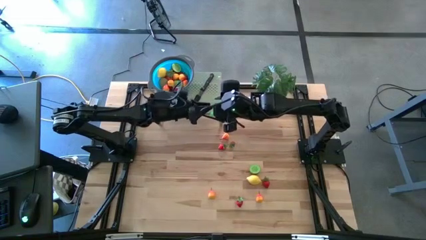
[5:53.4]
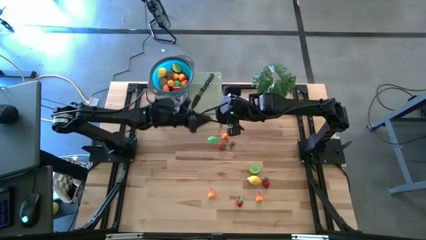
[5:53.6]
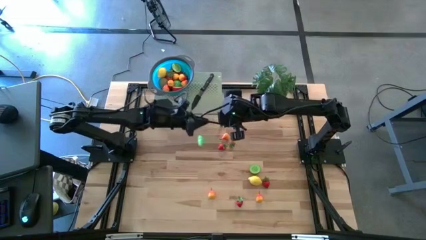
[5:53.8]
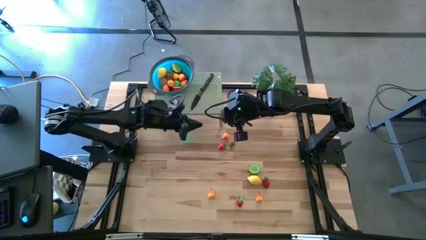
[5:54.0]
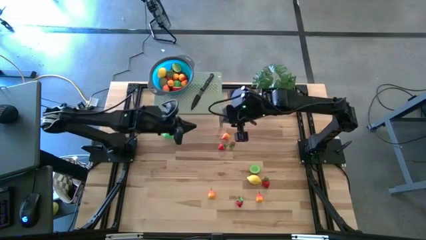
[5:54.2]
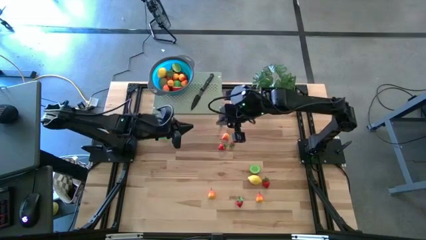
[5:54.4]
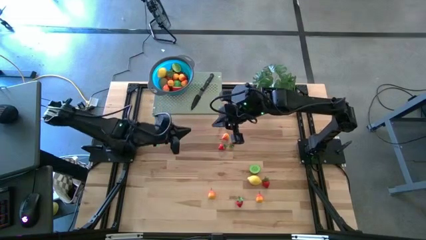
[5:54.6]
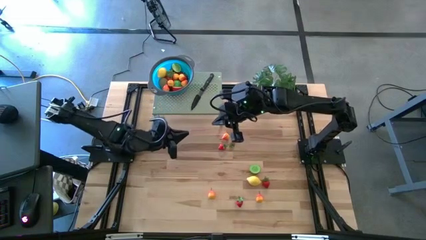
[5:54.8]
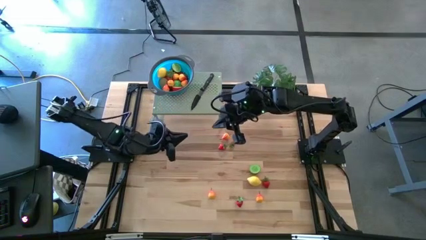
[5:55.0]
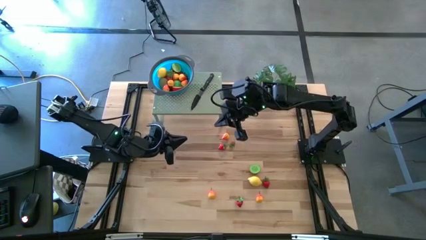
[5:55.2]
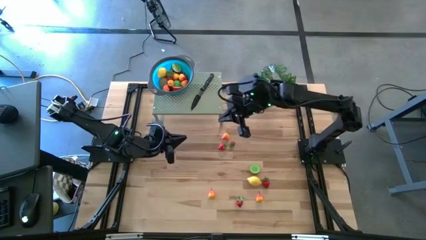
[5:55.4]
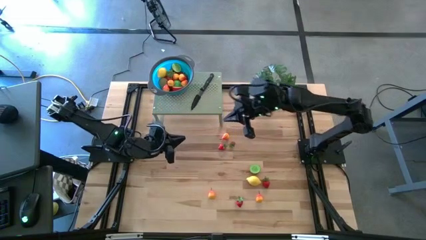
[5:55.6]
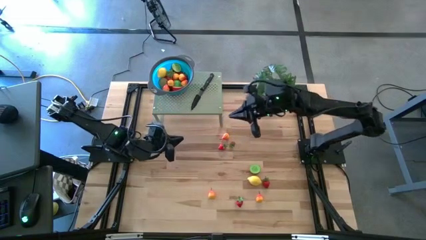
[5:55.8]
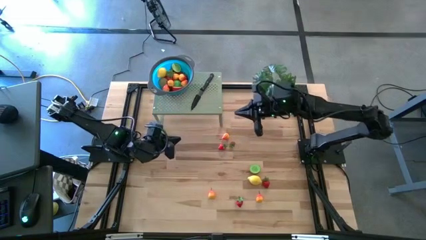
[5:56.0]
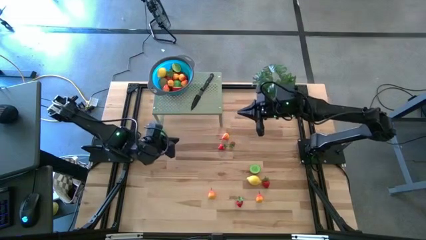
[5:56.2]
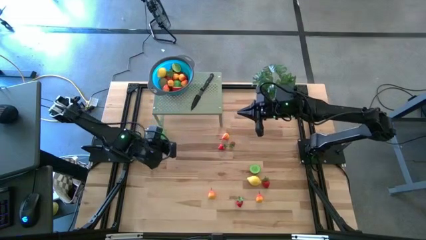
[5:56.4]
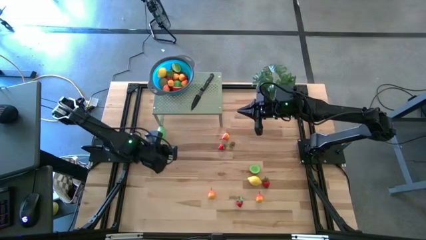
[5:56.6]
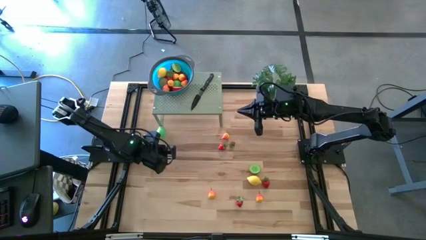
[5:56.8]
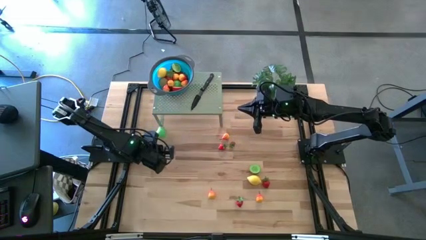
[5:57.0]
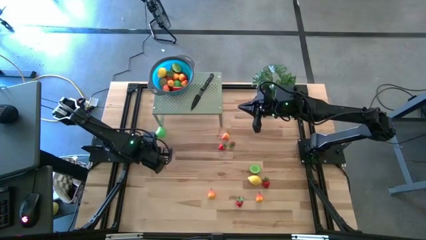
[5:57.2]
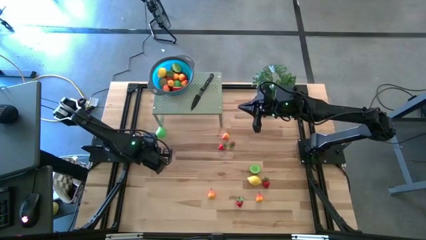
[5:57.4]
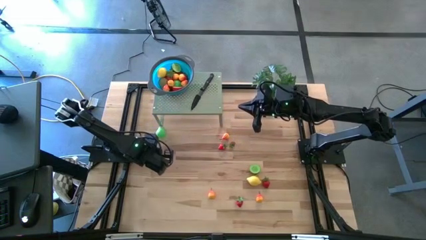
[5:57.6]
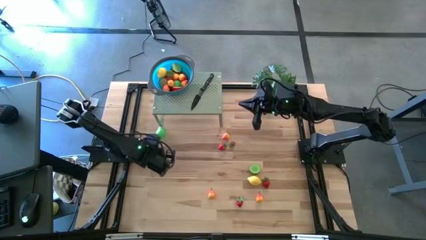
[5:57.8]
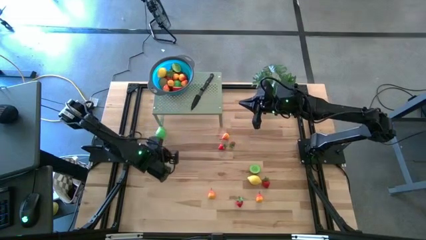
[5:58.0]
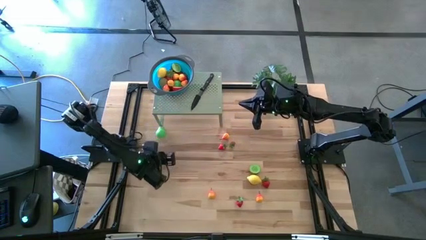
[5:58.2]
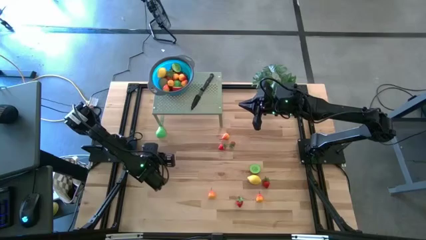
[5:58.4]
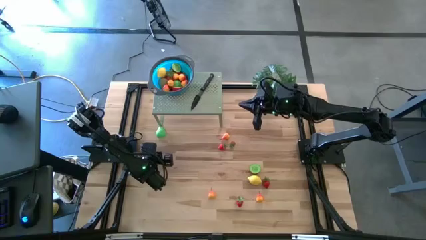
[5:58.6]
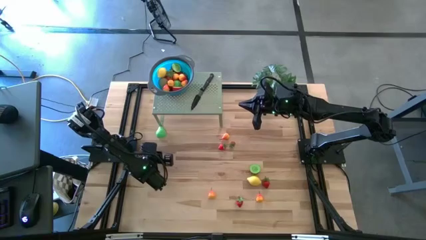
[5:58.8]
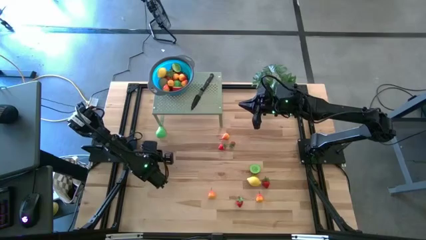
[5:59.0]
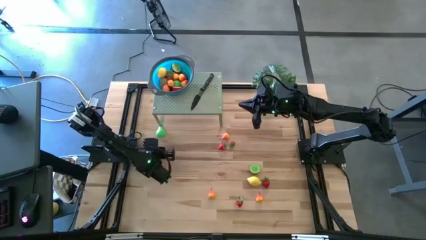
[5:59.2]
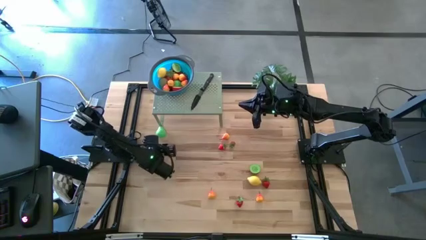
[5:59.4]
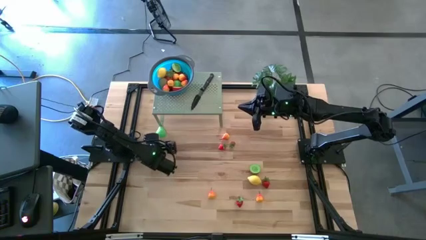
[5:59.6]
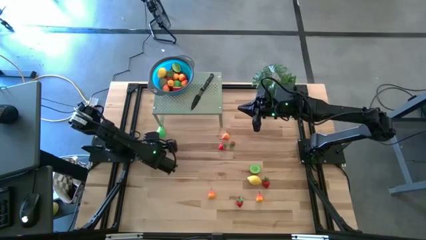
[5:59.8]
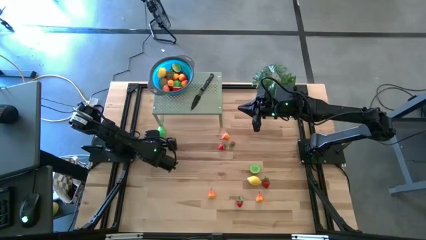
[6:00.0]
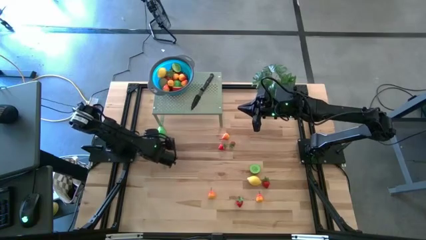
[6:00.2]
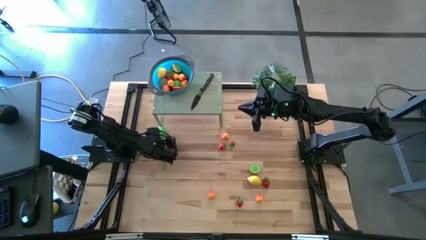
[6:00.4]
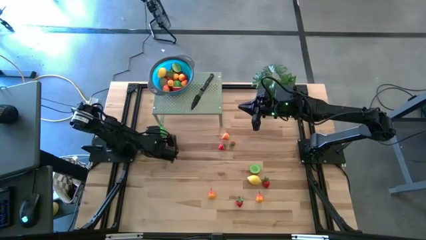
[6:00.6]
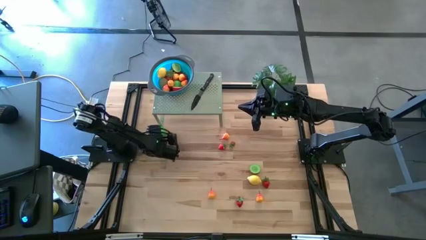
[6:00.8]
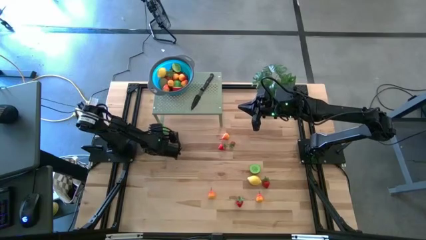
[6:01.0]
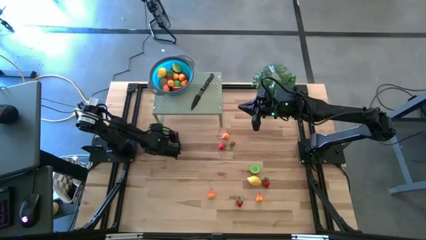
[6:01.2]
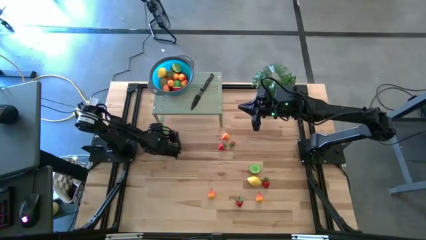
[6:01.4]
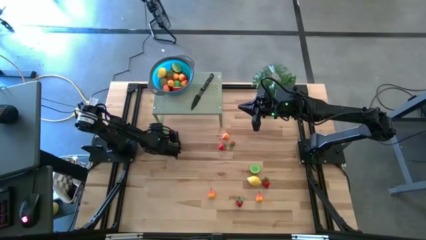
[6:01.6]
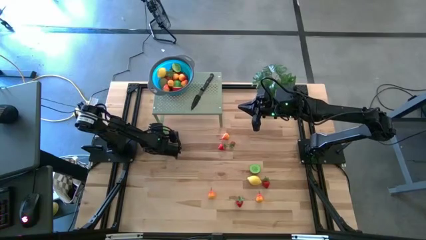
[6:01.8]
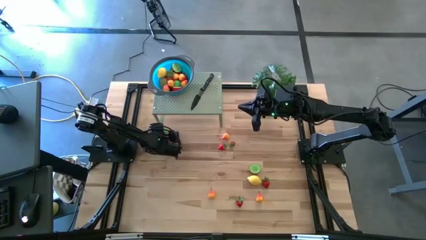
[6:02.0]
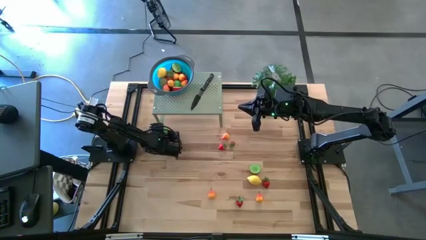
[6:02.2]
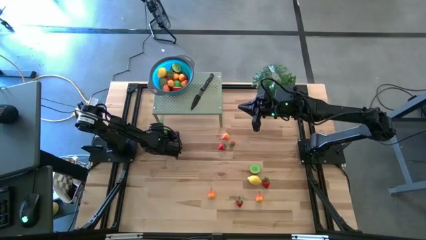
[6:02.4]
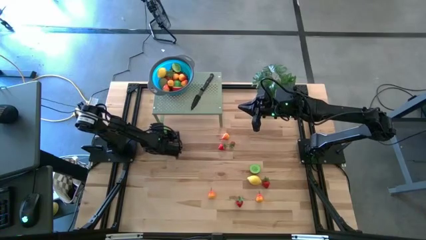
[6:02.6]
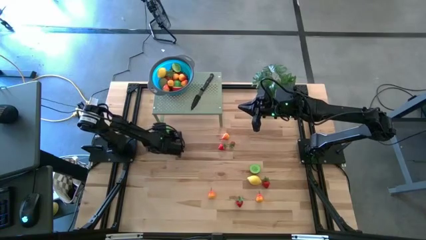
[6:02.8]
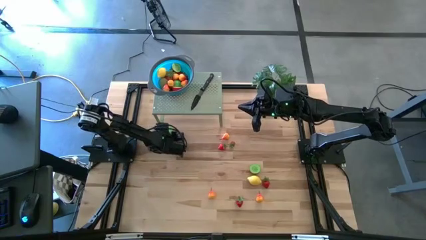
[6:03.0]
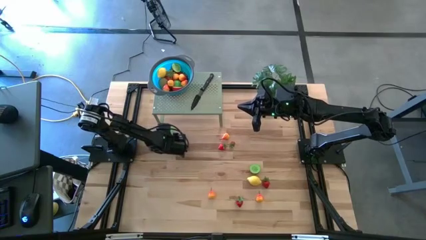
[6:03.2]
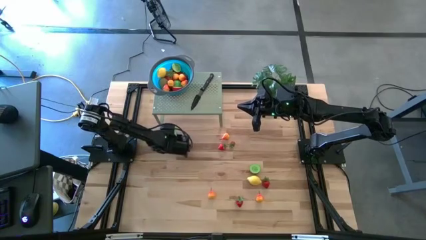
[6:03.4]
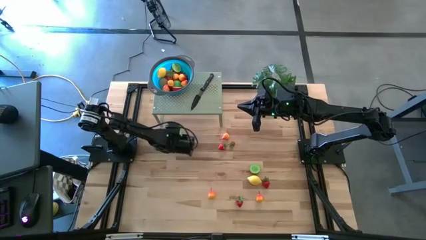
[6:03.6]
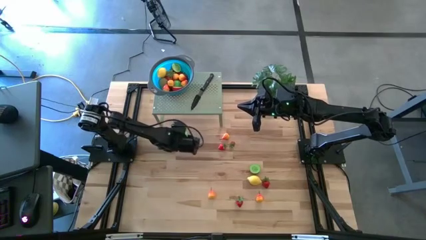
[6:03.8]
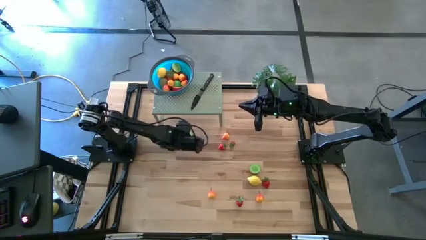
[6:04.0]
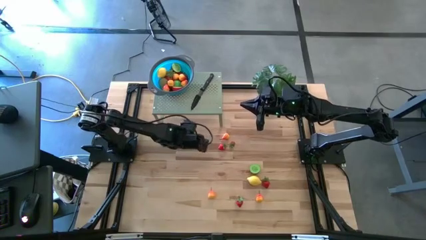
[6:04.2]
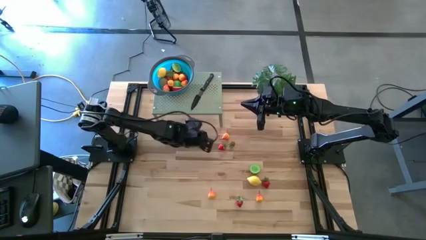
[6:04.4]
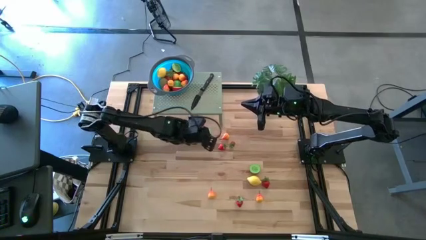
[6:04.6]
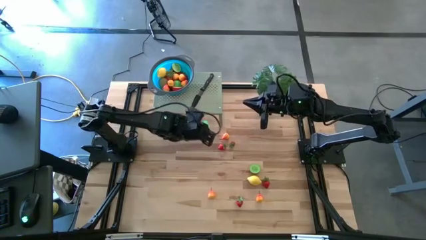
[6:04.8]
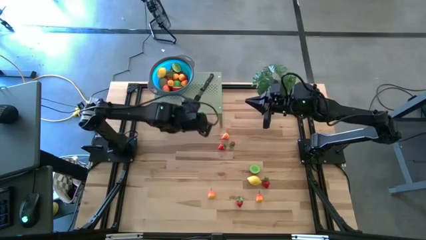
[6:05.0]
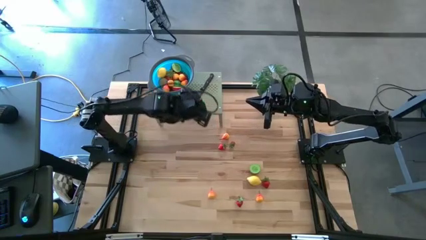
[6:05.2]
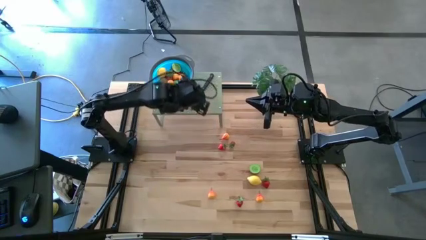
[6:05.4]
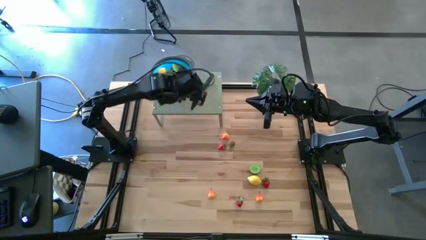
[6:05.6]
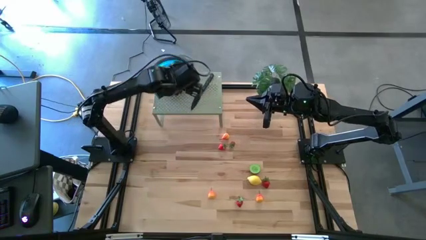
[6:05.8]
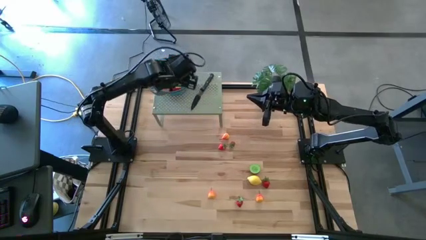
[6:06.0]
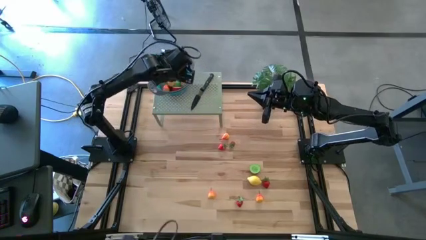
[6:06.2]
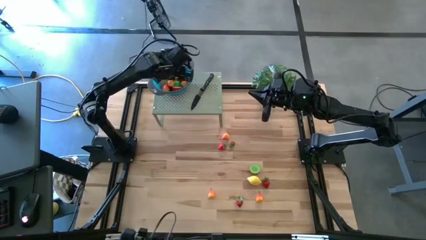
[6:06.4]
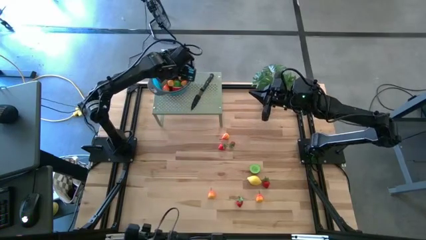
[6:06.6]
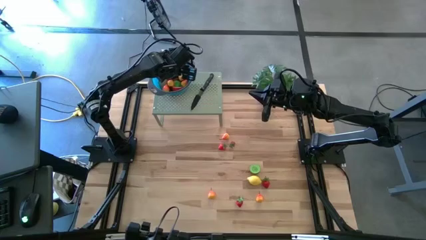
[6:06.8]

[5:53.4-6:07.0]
Task: Pick & Place Fruit
Put the half green pear into the strainer bowl on the shelf

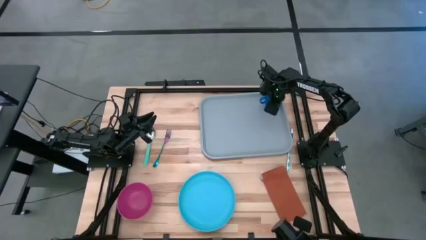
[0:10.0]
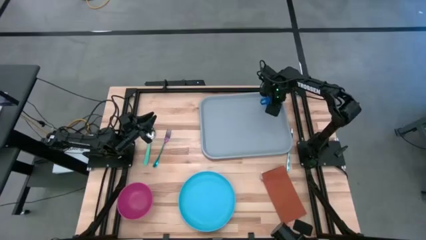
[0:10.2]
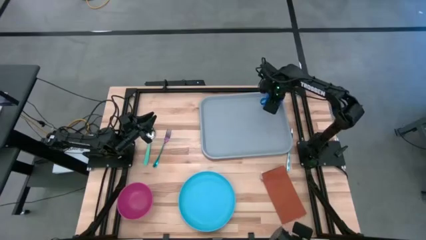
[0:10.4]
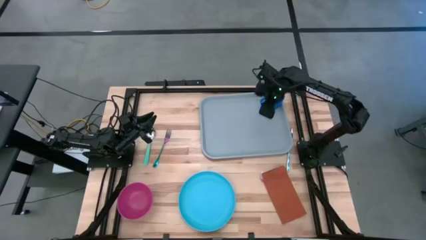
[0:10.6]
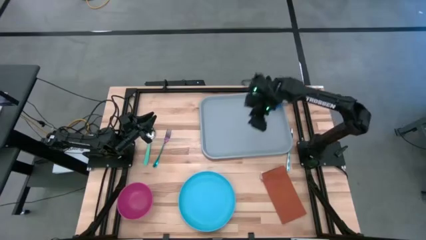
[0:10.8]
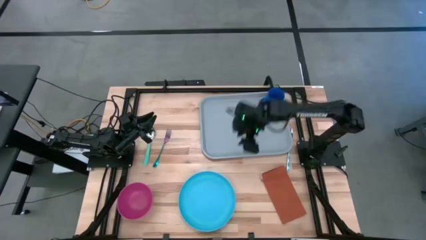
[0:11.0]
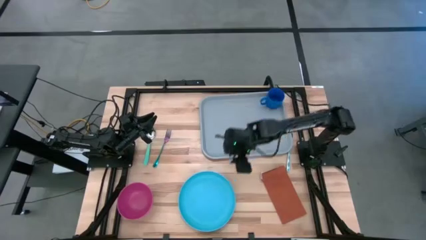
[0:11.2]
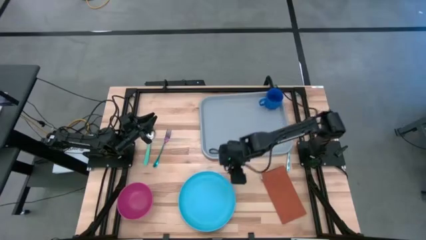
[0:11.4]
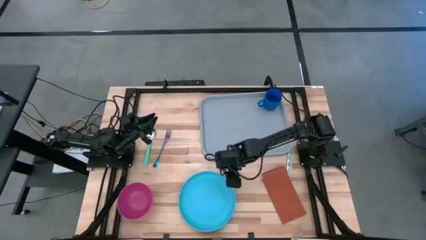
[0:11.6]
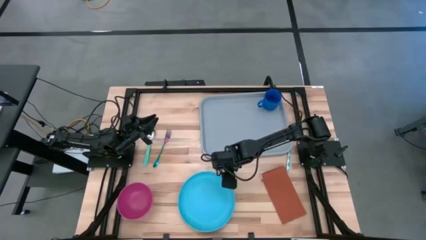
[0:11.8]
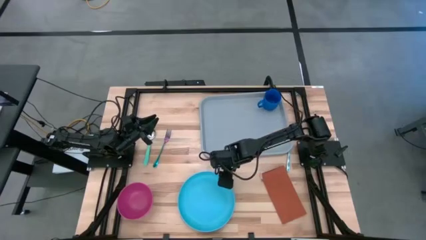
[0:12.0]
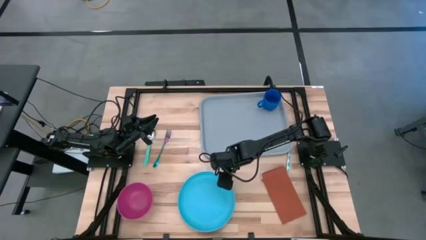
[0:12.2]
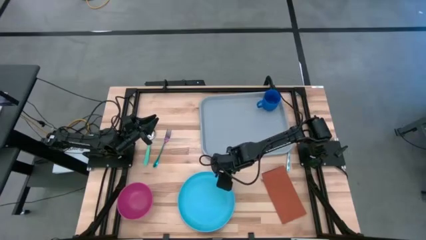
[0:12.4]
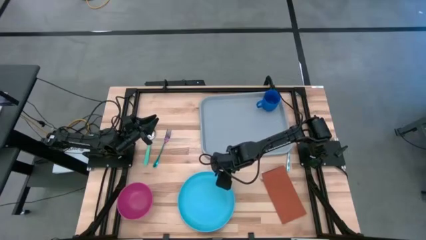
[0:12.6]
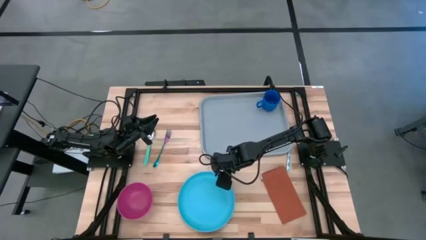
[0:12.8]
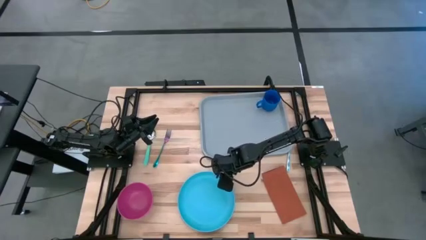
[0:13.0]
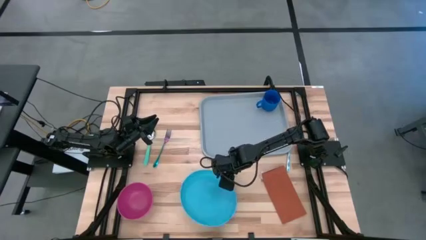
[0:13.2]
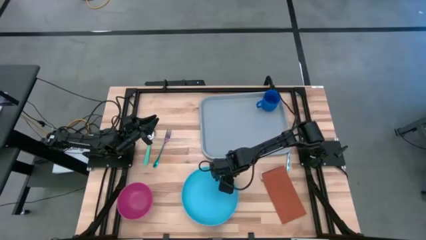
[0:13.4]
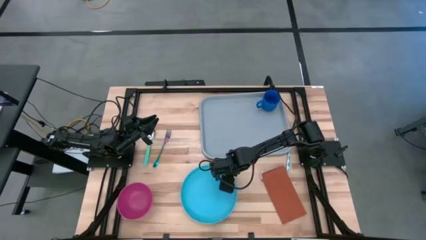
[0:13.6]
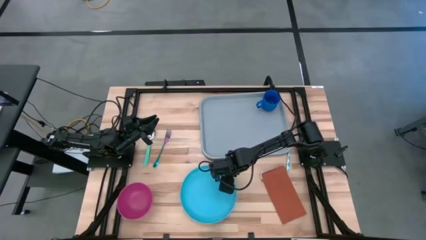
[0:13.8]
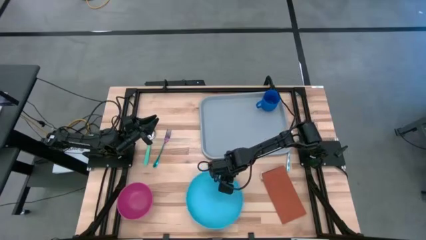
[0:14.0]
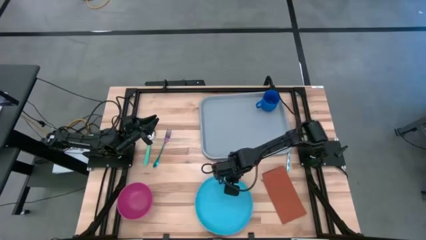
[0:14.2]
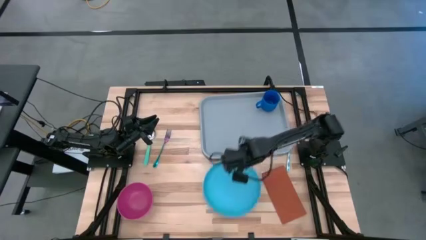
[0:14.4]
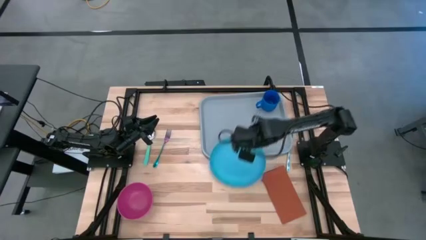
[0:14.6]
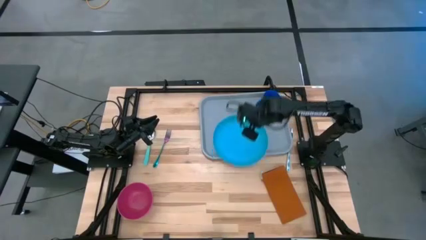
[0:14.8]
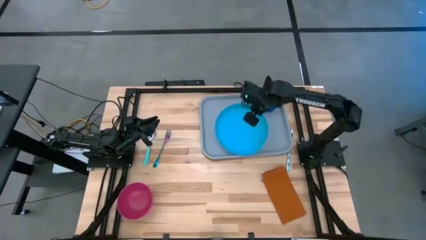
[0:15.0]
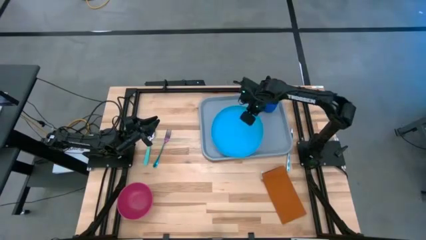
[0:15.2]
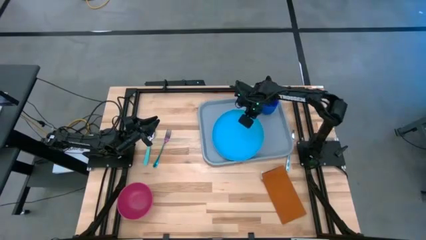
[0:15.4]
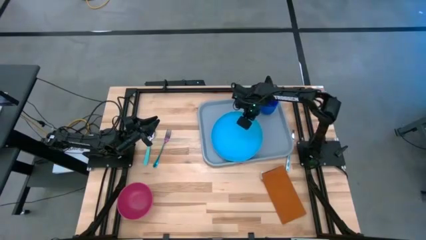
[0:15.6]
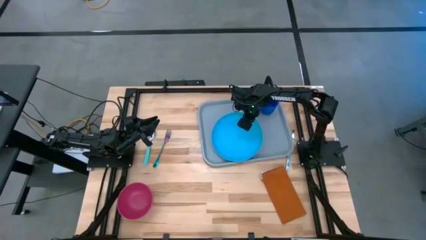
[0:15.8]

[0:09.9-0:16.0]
Task: Set up tray
Put the light blue plate on the gray serving tray to the bottom left of the blue mug
